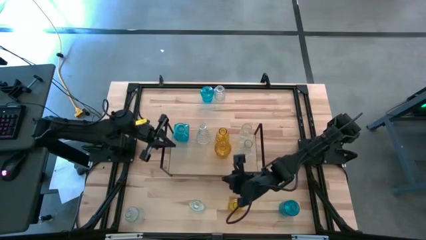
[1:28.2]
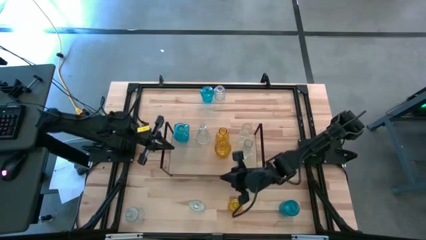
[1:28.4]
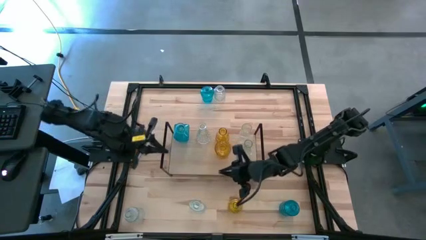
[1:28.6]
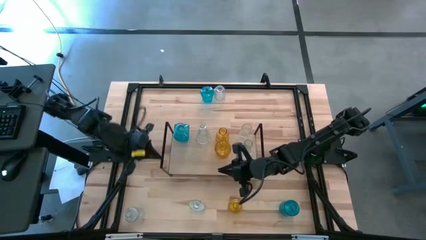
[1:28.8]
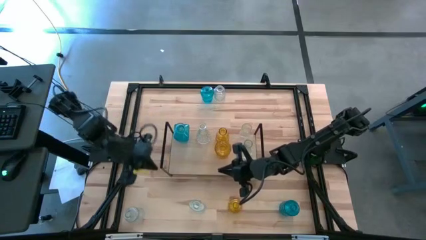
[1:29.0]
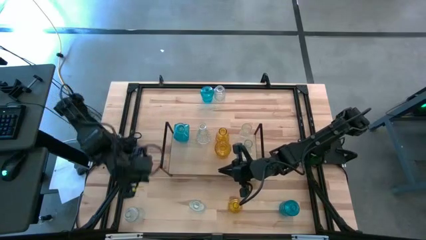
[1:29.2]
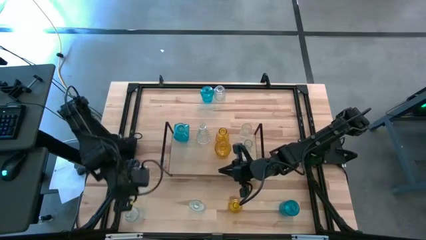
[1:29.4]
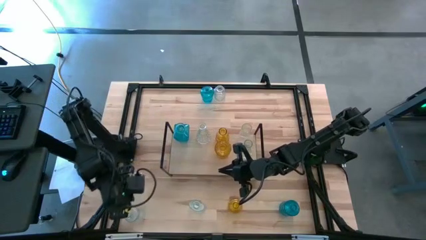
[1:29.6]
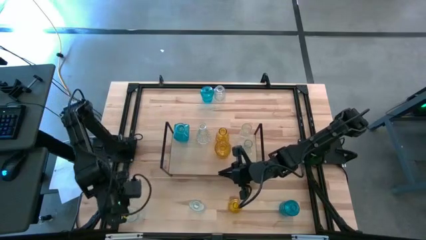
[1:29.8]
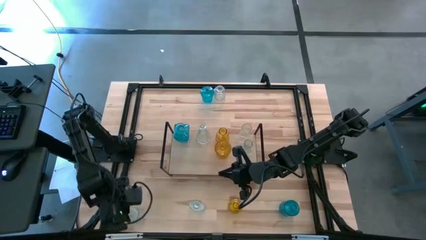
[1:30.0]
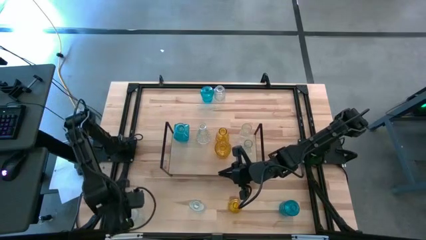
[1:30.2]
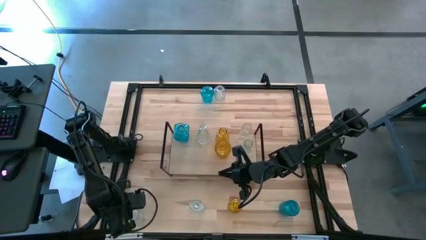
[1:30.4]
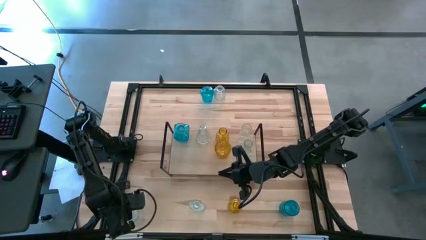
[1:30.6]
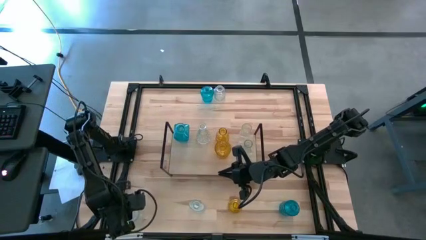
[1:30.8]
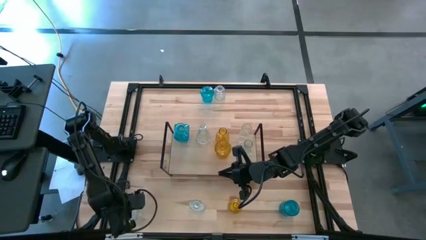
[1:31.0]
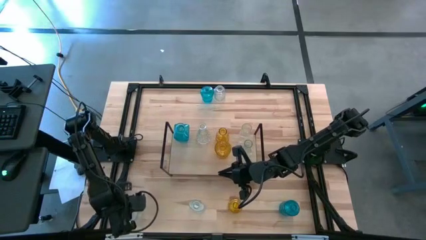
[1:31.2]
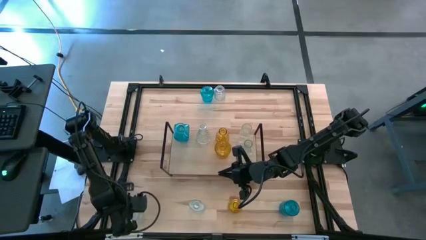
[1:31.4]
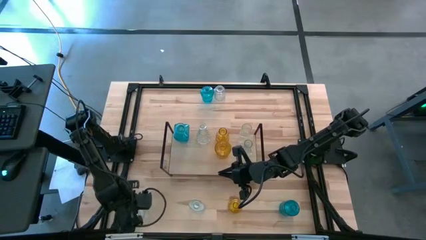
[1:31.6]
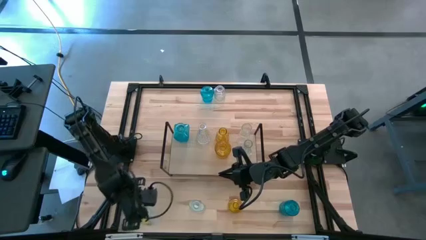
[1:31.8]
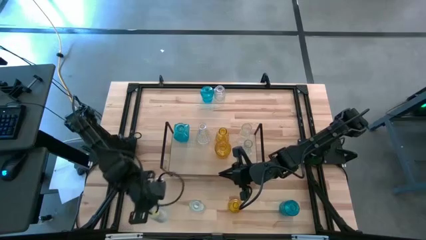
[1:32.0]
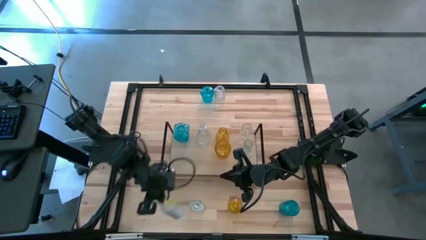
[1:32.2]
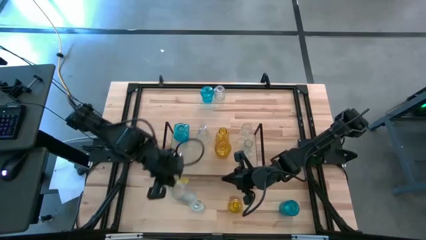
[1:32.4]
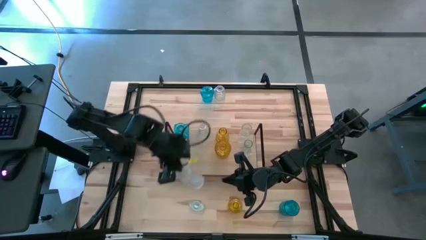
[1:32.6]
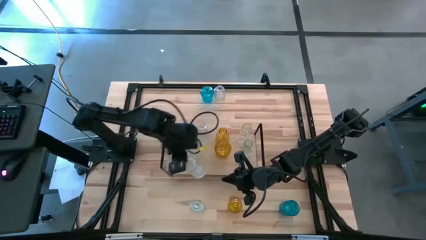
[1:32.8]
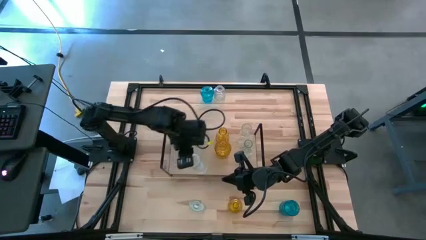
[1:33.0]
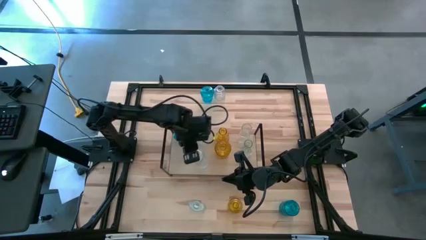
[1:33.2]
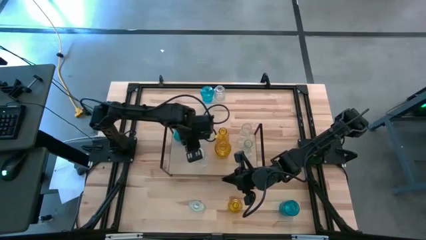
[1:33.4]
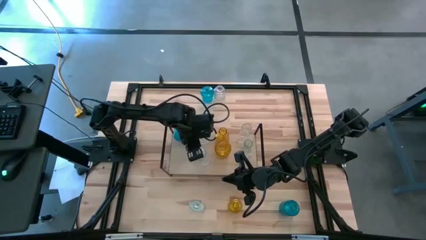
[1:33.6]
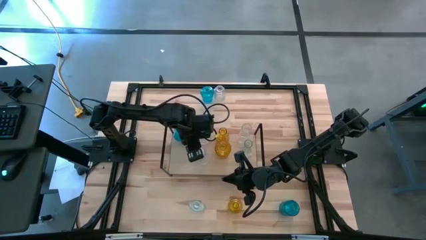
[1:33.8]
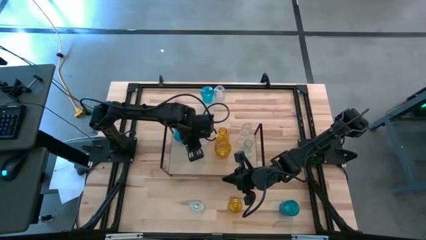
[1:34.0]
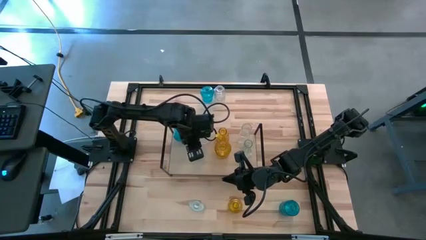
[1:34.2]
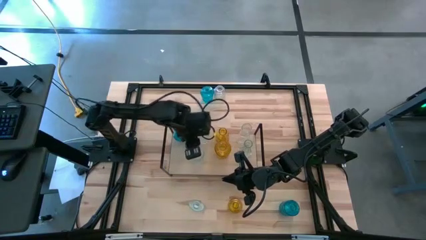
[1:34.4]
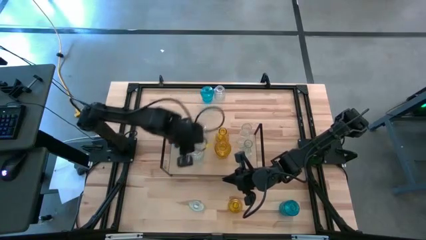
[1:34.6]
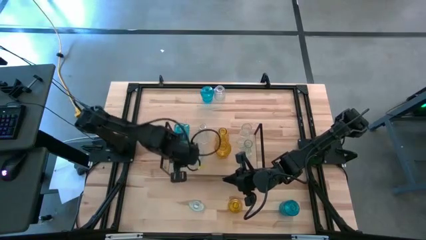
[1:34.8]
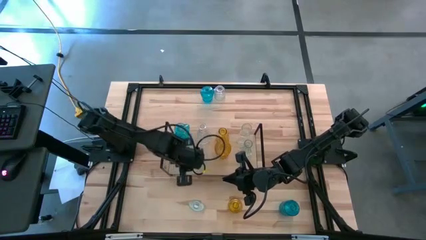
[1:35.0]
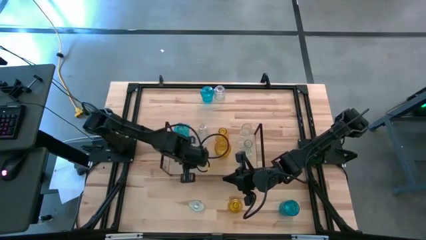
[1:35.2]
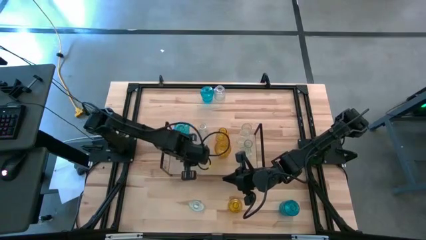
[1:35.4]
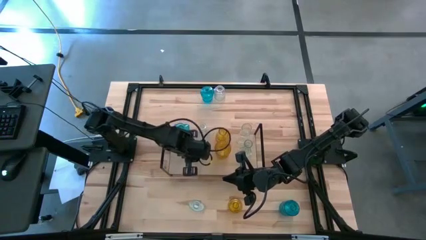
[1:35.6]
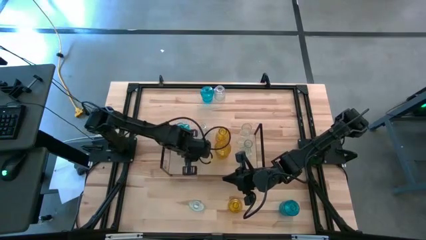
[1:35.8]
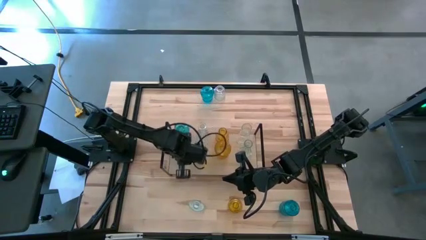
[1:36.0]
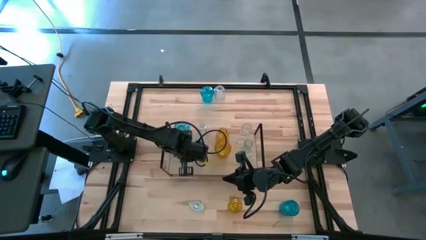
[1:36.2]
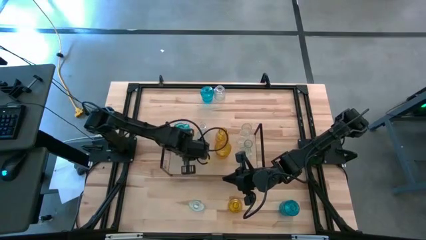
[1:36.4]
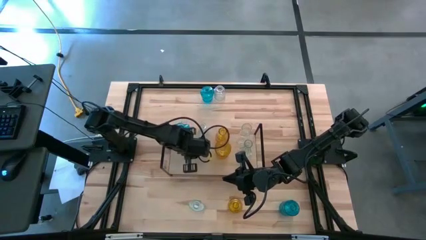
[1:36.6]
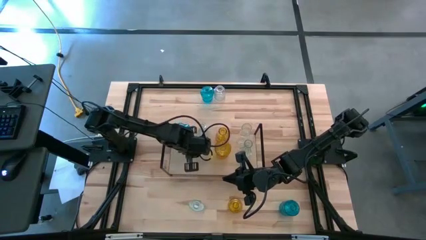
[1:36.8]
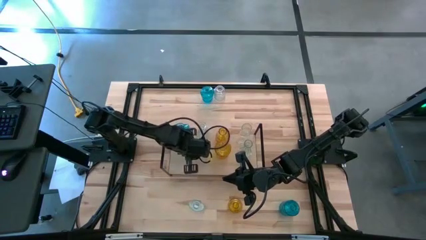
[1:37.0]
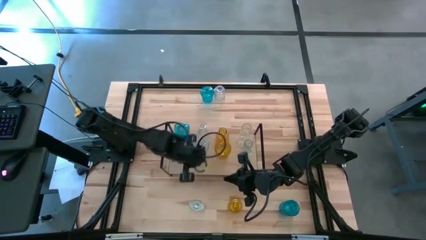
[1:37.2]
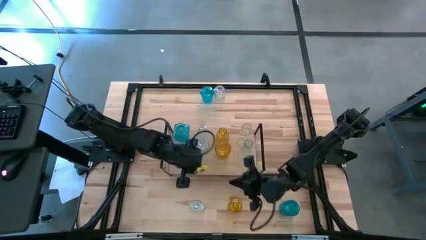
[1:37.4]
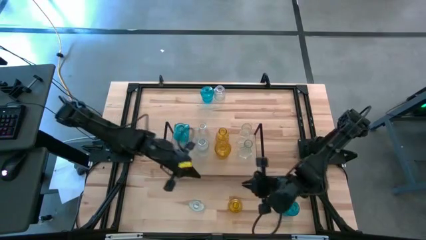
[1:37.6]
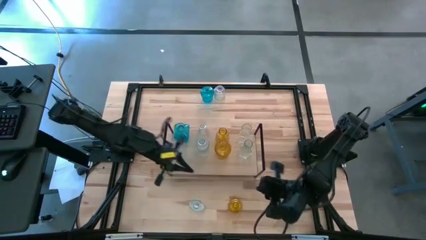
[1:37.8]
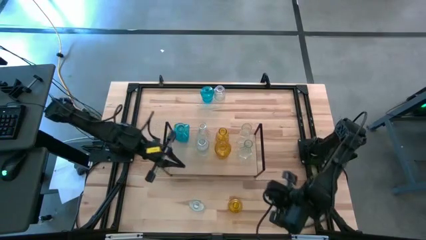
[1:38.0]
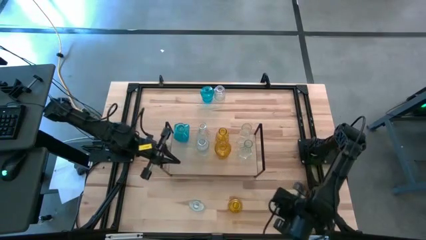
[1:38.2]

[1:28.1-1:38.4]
Task: sort vases onto shelf
Put the bottom left transparent vase on the shelf

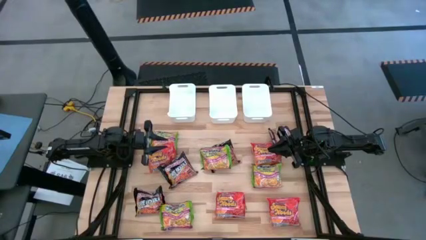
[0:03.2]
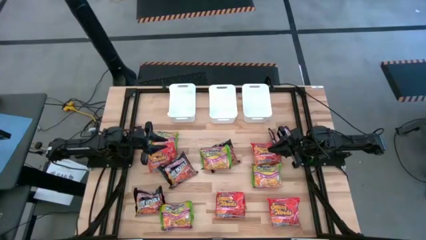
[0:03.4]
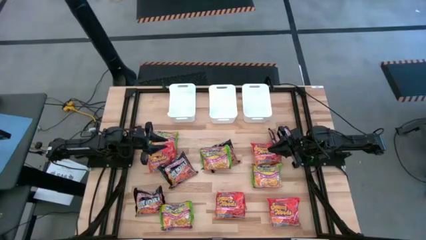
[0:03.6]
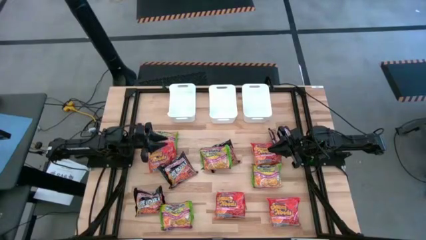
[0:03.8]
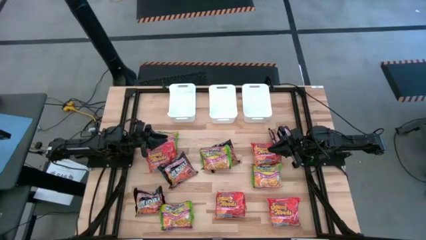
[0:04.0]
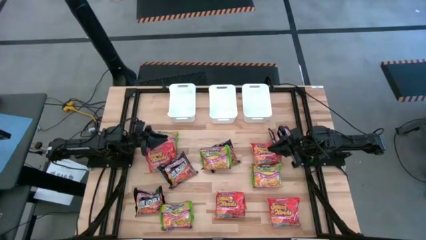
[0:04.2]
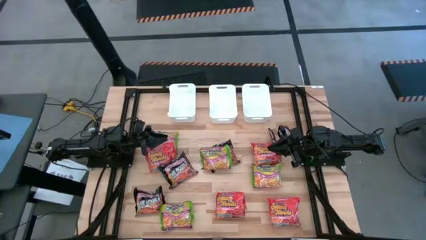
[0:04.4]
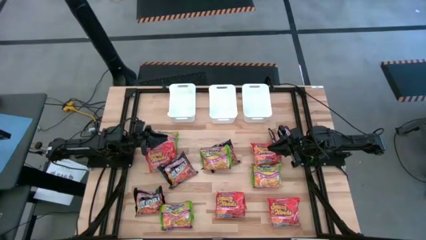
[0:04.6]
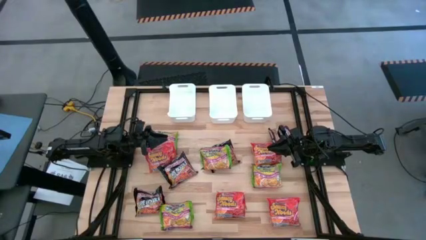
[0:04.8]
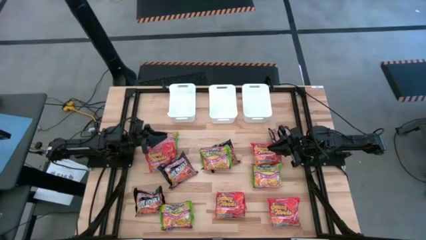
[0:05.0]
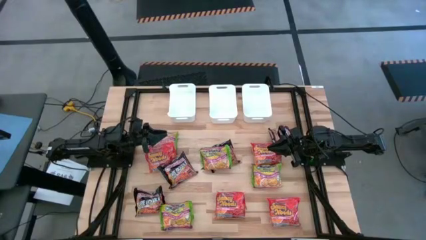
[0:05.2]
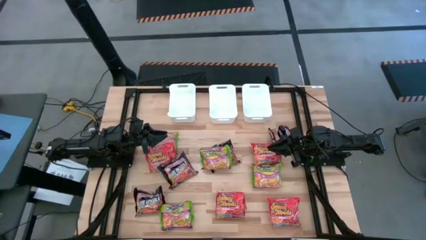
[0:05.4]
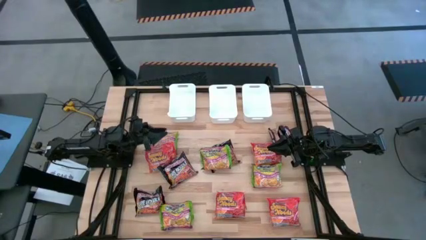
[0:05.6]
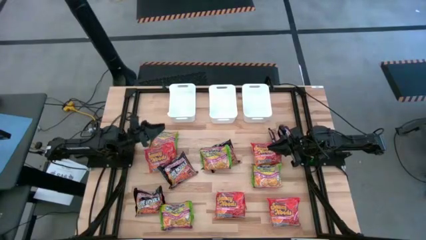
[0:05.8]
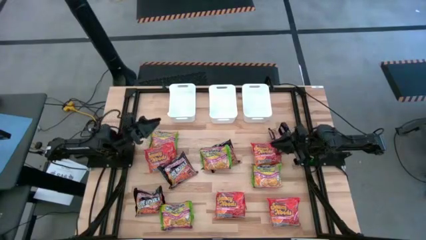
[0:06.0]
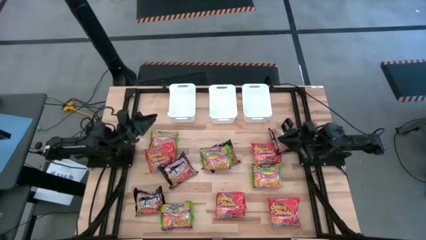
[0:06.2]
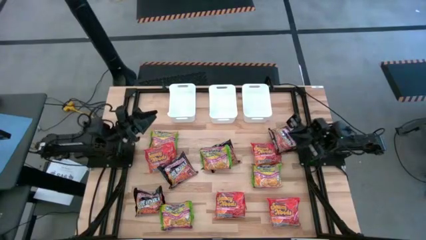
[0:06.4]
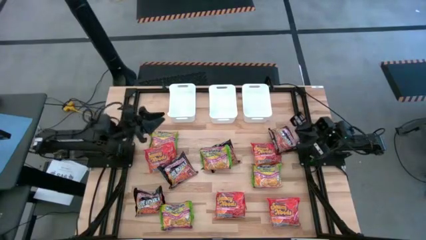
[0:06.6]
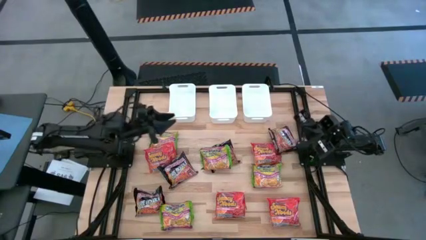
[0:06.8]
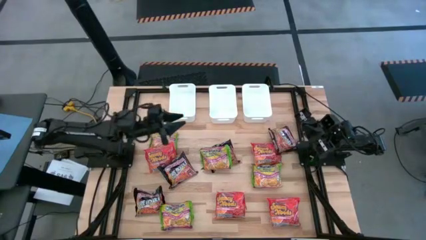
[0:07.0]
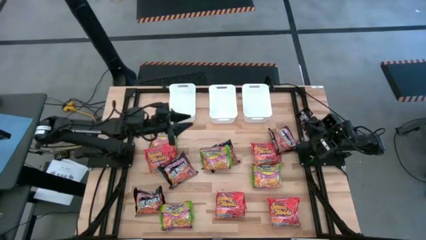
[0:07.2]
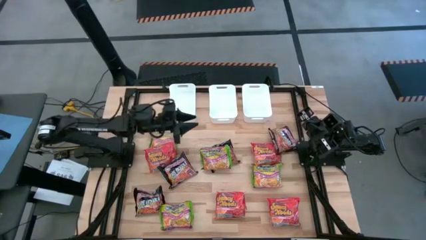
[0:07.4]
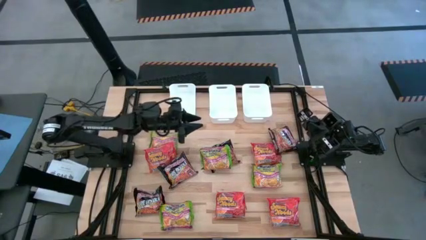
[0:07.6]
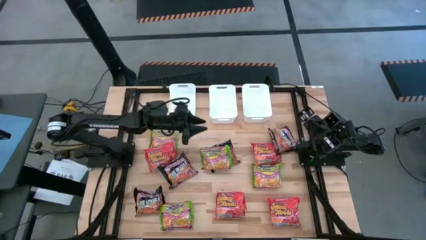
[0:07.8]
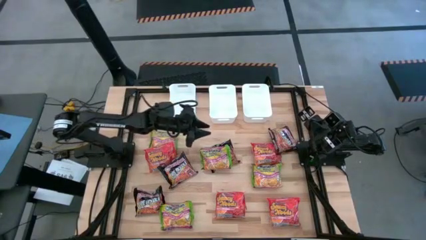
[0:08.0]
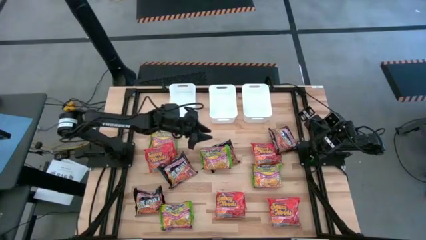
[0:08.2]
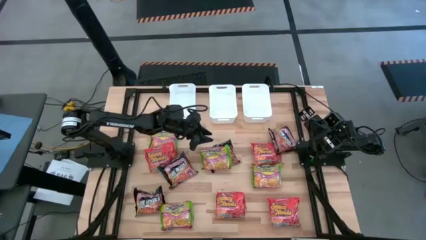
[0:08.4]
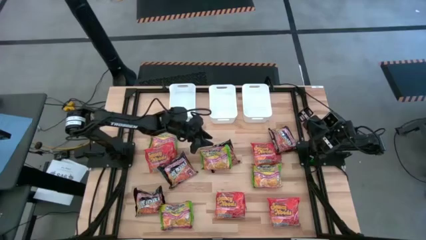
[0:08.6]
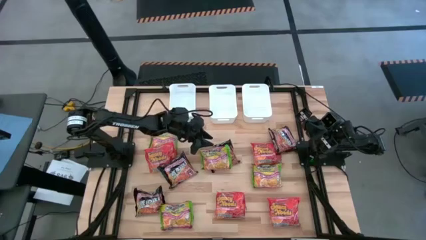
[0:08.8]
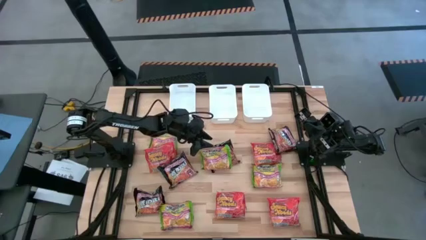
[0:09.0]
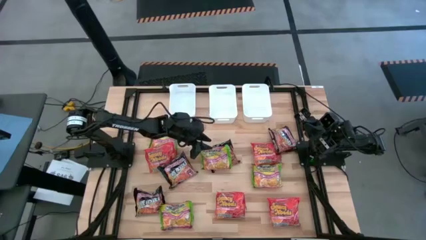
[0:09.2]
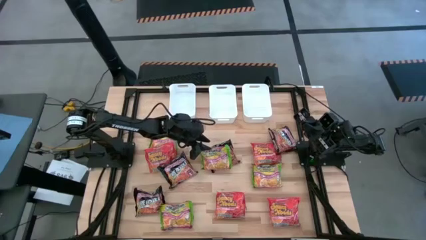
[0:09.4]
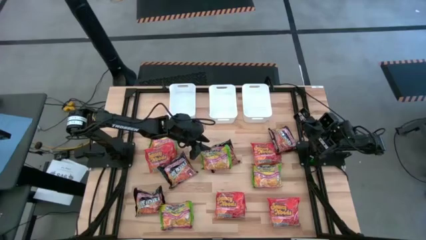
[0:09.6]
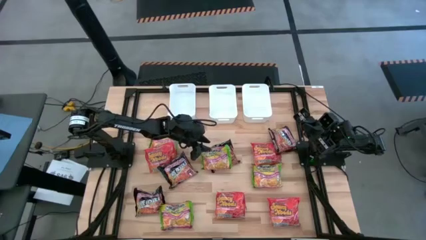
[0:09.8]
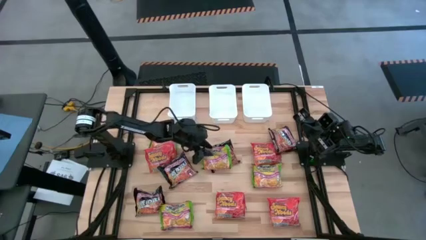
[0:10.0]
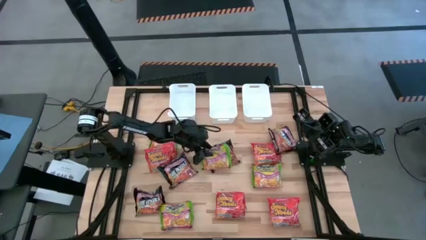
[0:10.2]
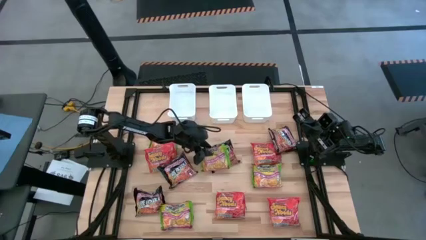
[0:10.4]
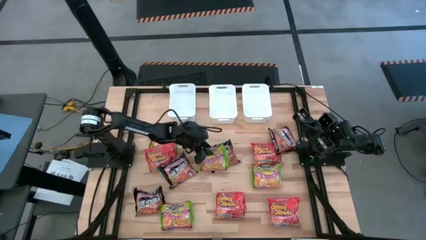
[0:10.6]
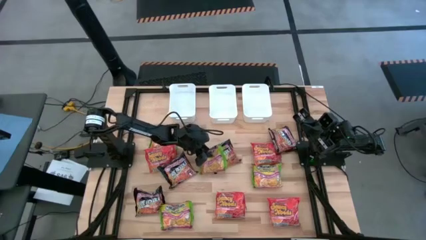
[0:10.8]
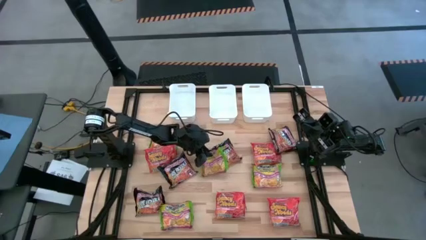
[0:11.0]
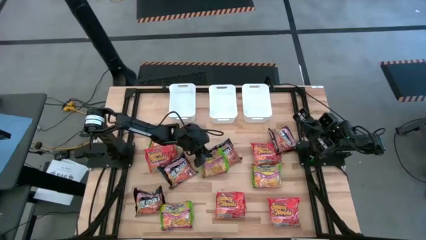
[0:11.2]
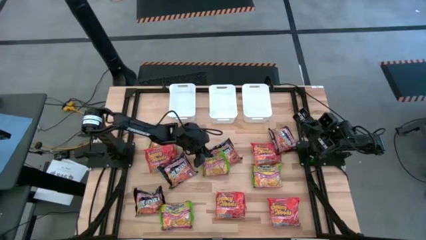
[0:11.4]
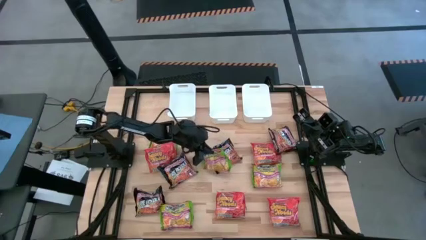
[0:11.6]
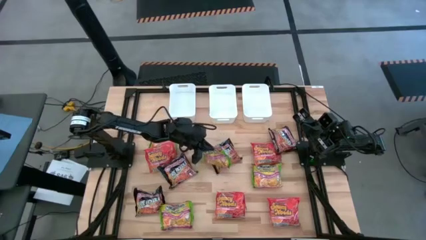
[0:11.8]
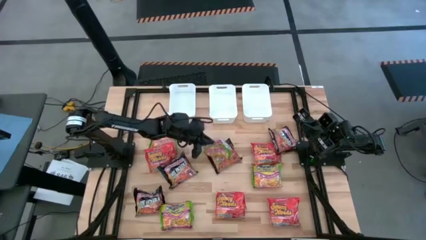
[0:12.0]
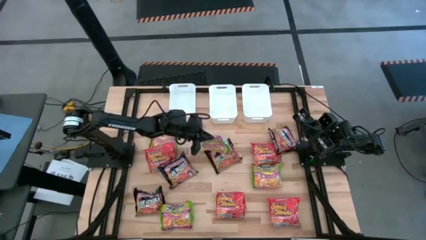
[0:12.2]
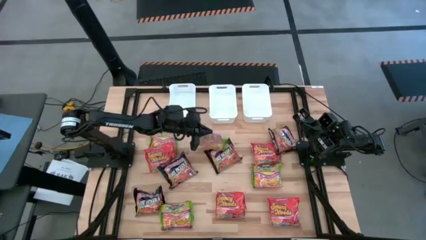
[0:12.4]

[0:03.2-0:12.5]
Task: Sort Maruchan noodles
Put the green noodle pack into the left white bin
